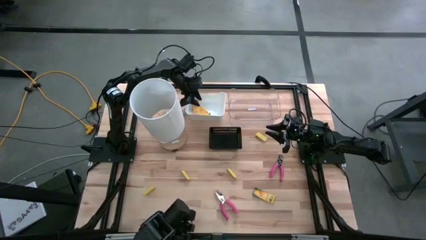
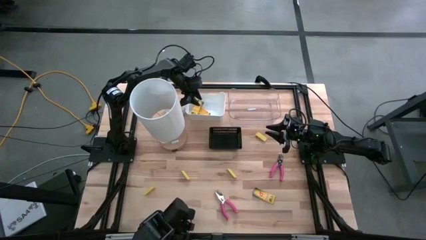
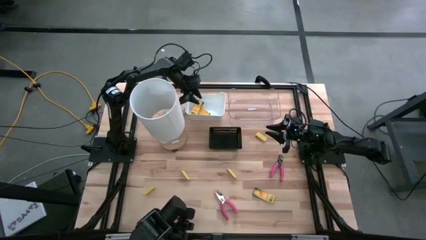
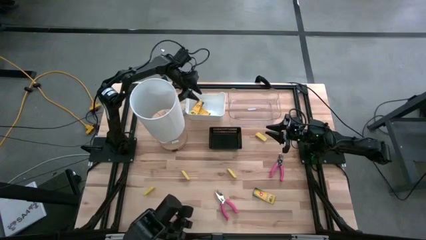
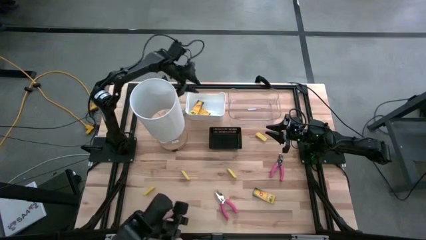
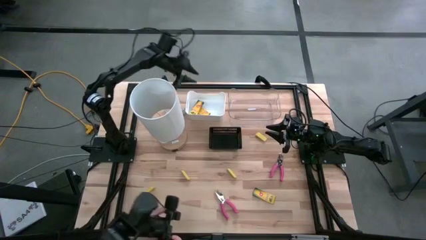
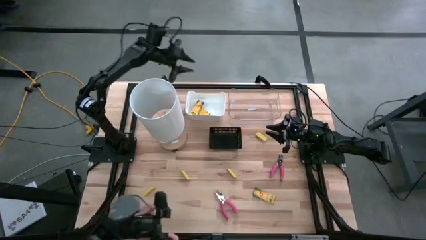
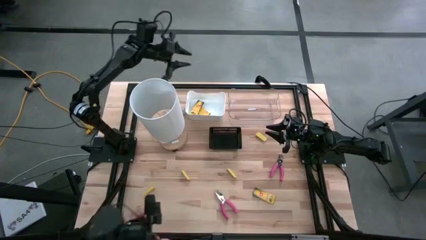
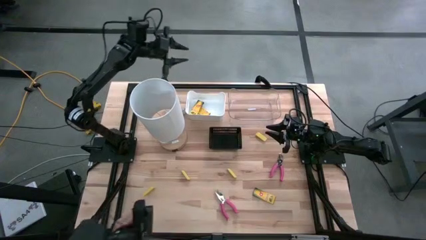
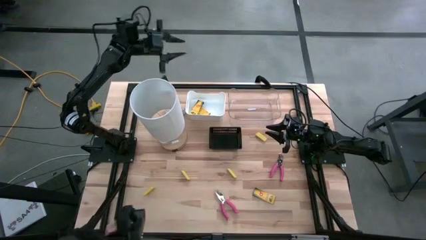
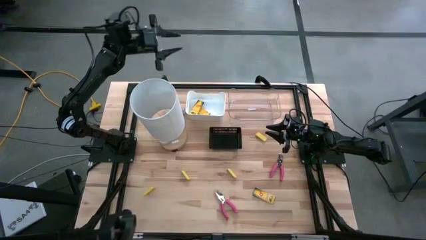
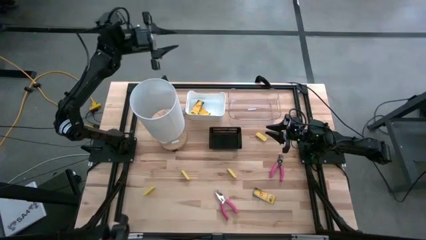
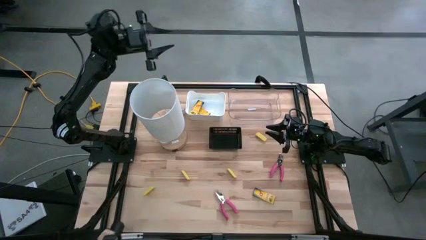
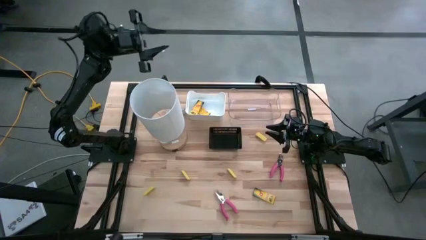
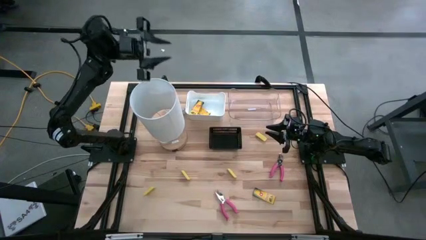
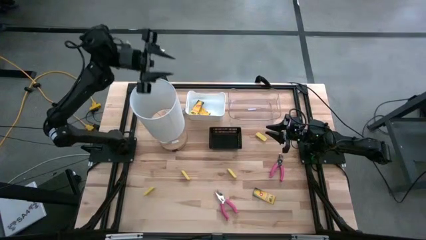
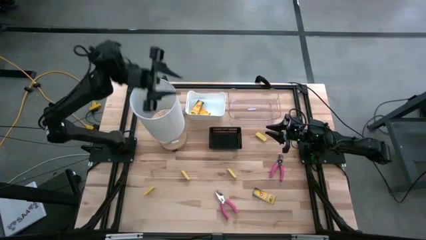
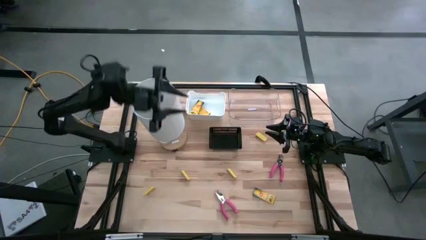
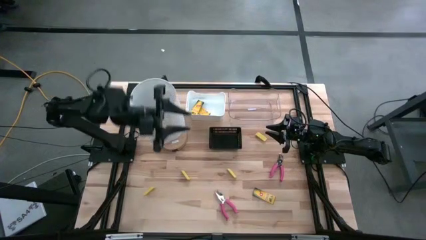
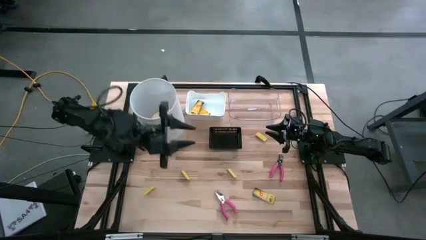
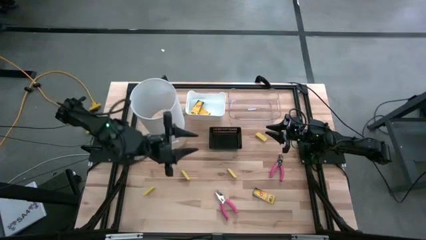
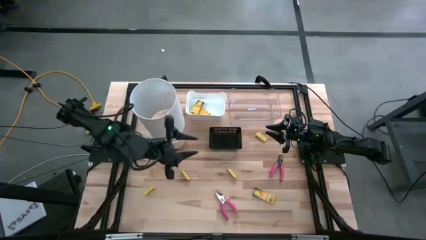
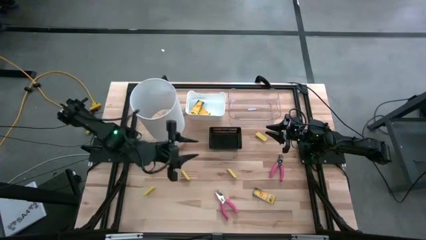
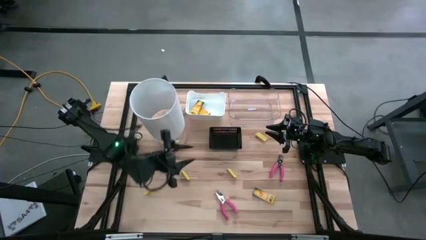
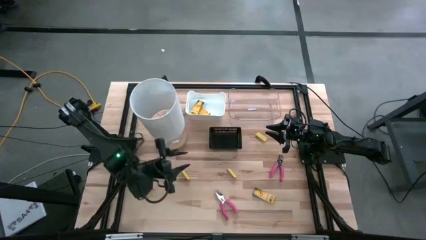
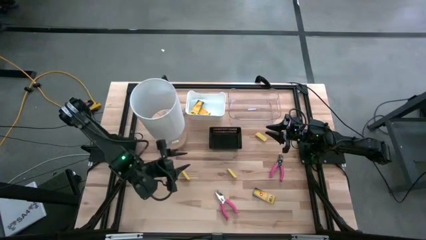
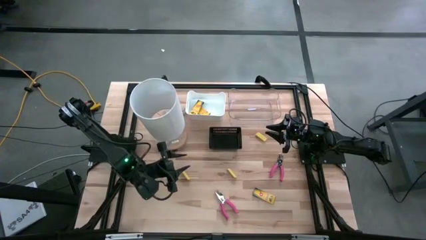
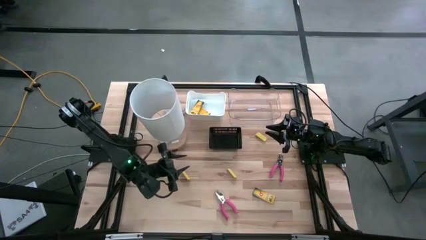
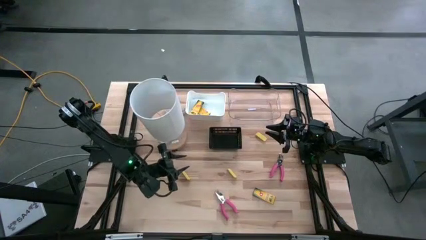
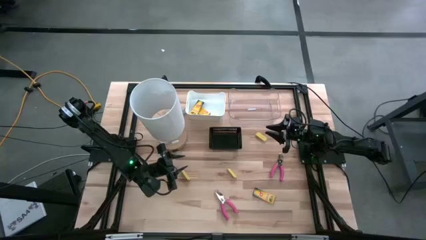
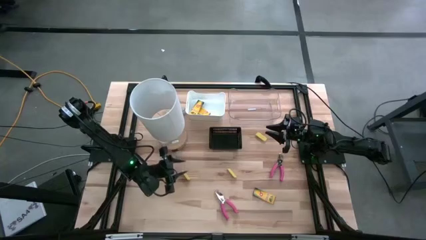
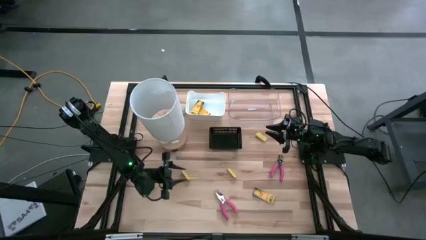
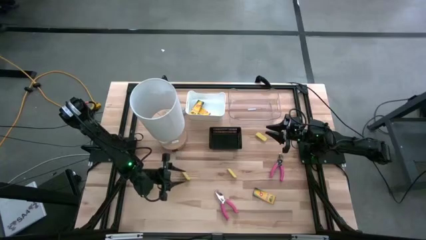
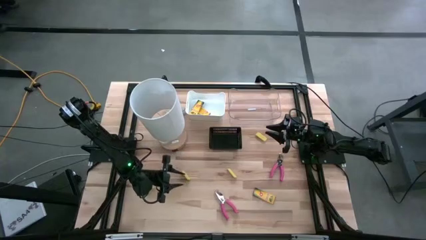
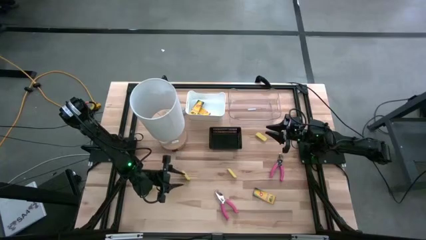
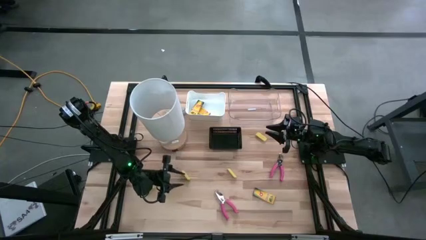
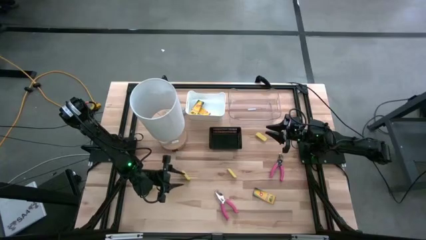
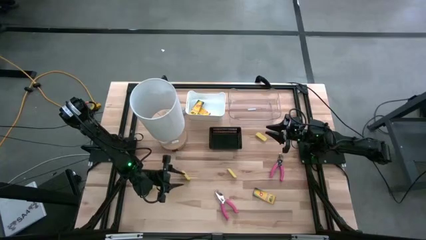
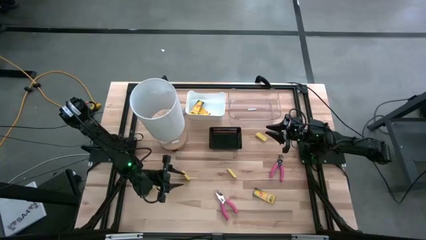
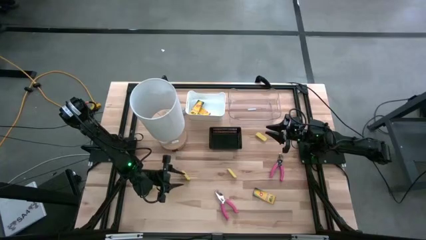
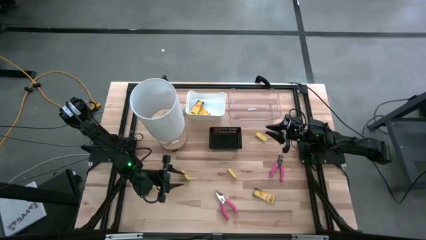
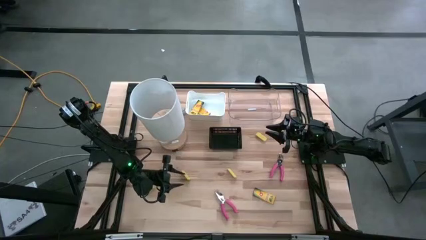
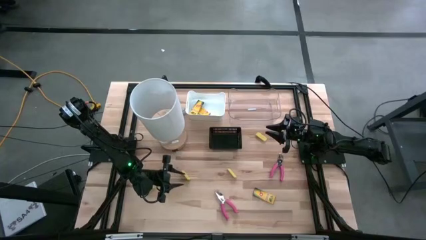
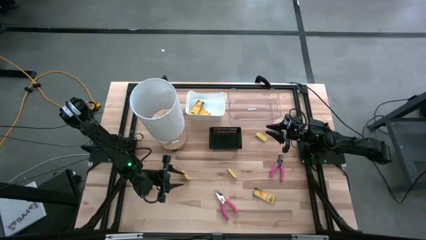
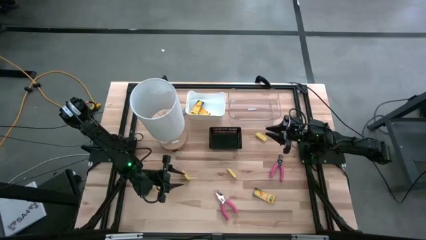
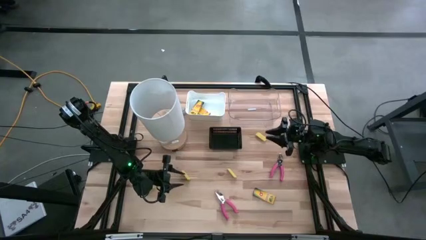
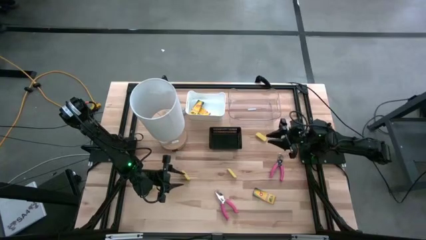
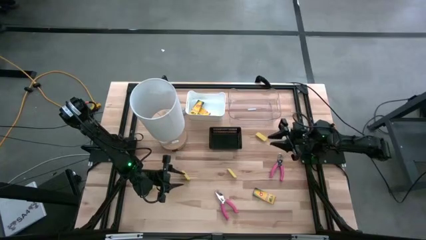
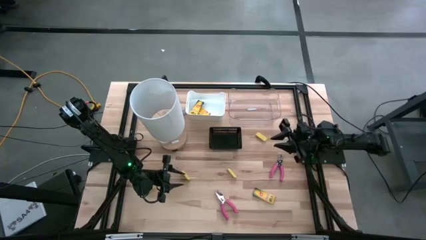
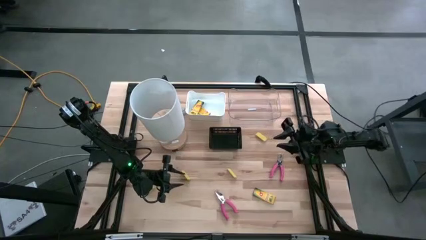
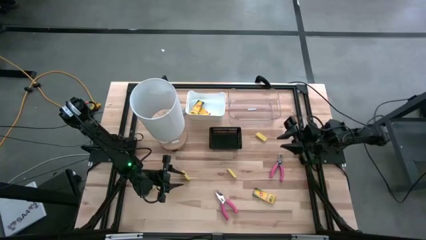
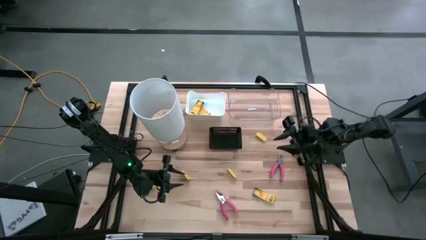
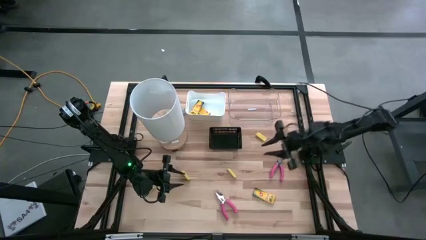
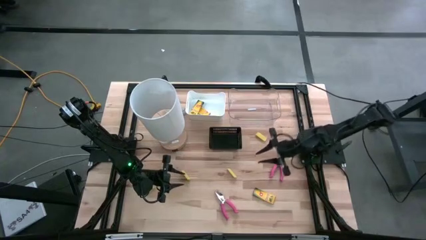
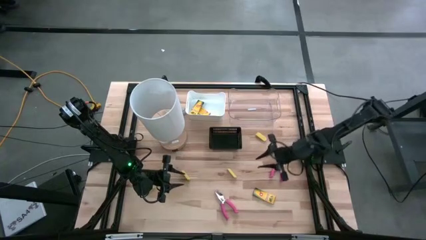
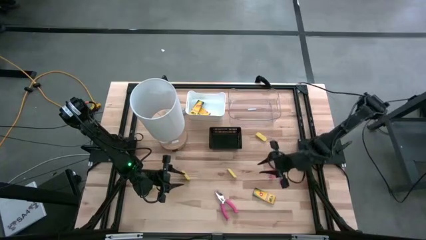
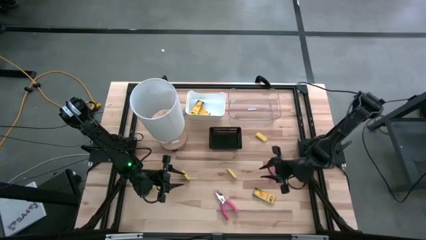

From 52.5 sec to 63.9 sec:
Task: Pick & Place School Supplies
Put the yellow crayon box into the white bin
